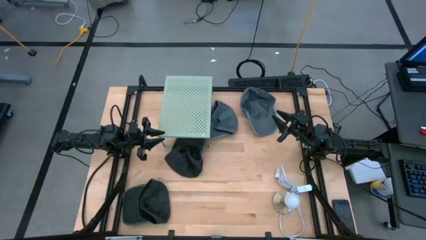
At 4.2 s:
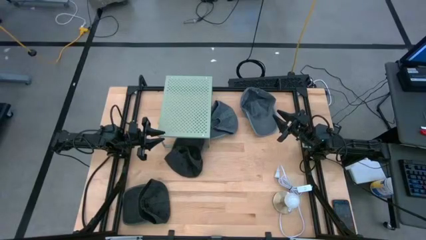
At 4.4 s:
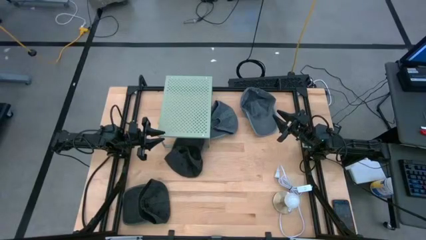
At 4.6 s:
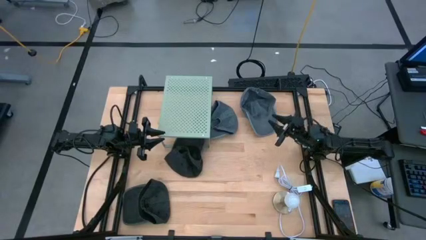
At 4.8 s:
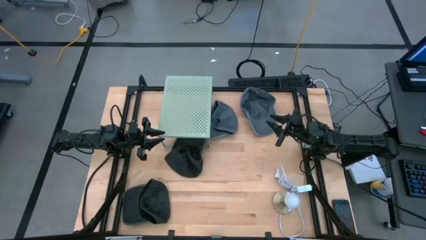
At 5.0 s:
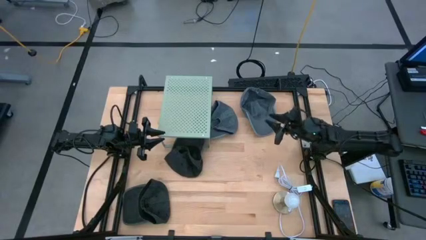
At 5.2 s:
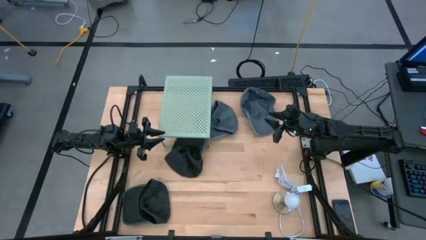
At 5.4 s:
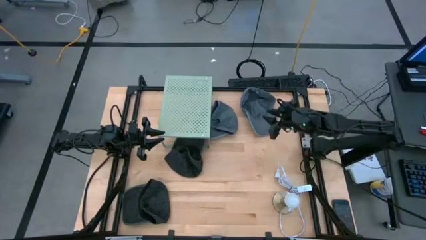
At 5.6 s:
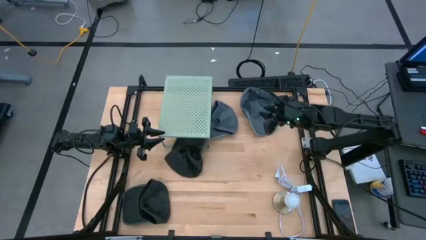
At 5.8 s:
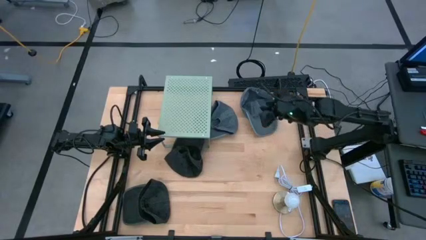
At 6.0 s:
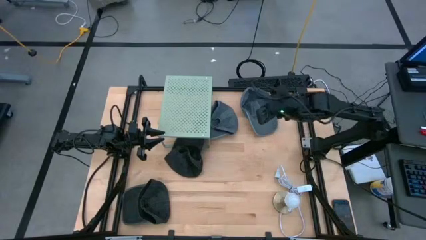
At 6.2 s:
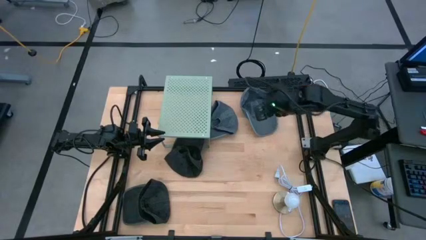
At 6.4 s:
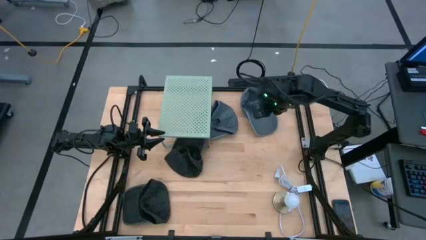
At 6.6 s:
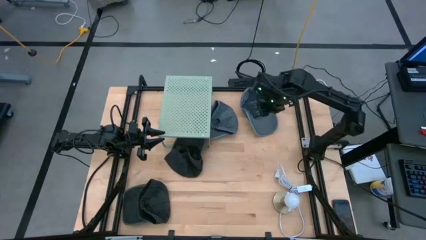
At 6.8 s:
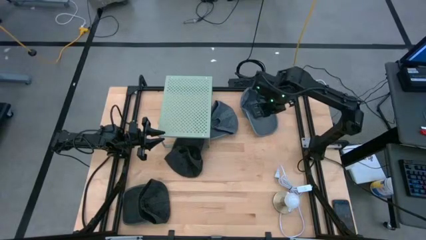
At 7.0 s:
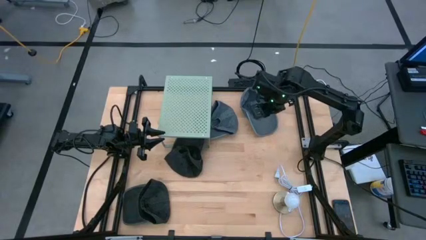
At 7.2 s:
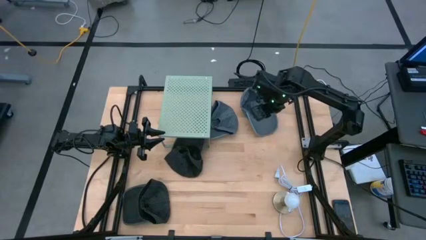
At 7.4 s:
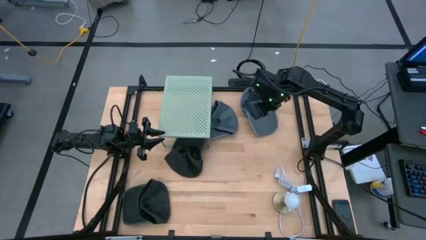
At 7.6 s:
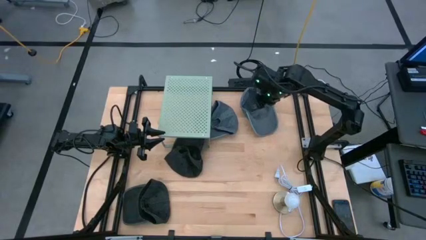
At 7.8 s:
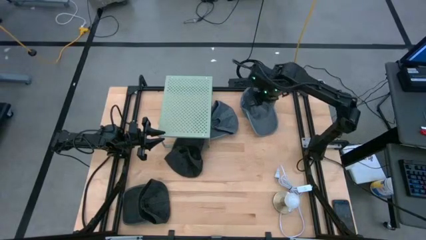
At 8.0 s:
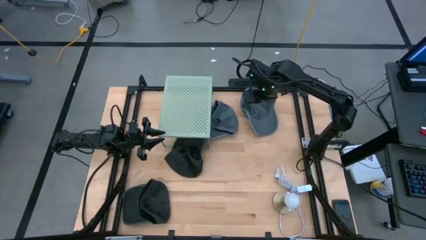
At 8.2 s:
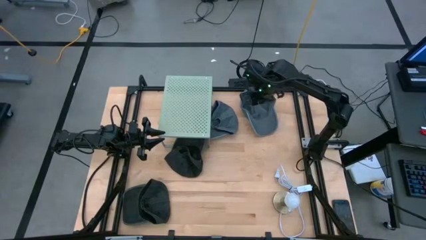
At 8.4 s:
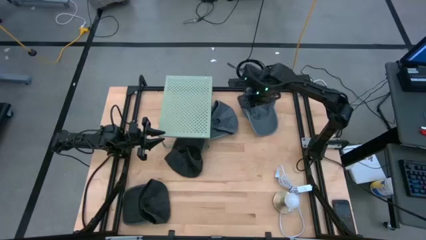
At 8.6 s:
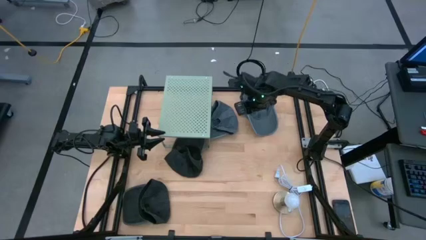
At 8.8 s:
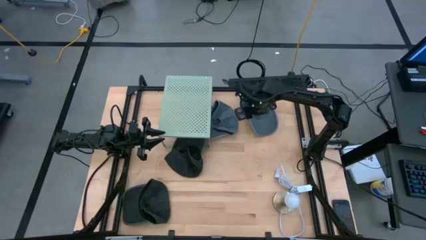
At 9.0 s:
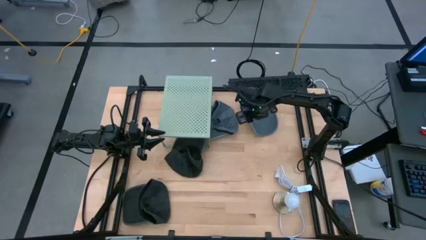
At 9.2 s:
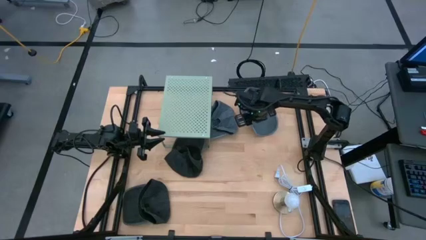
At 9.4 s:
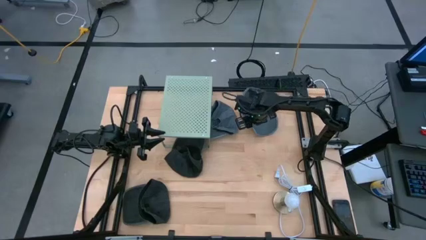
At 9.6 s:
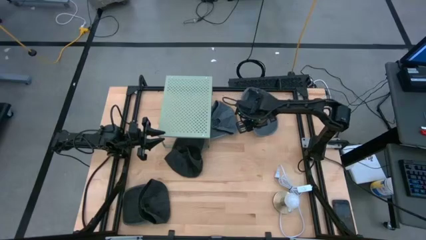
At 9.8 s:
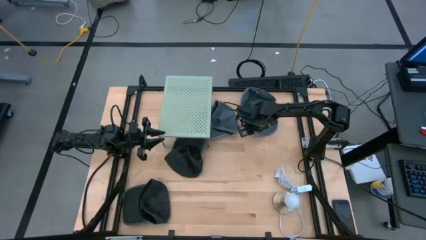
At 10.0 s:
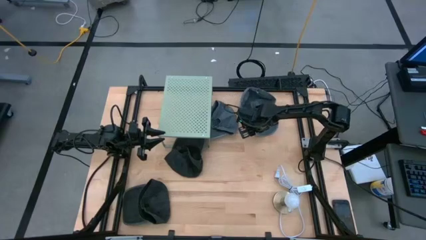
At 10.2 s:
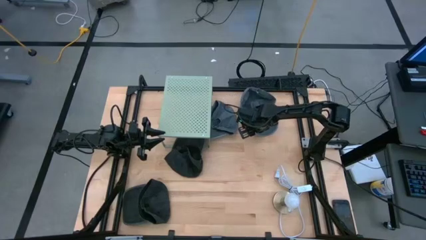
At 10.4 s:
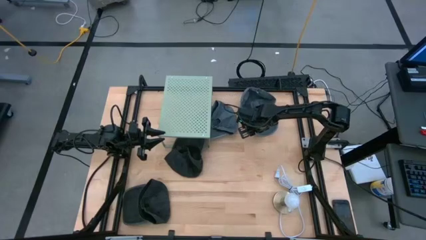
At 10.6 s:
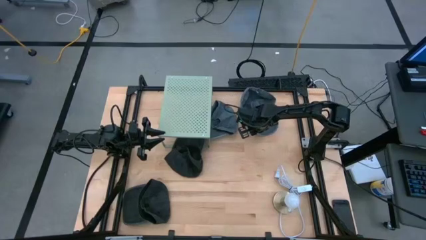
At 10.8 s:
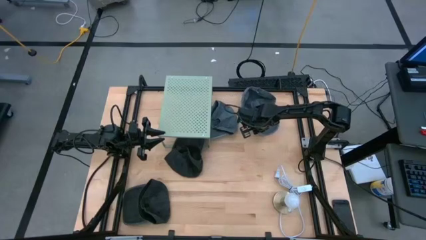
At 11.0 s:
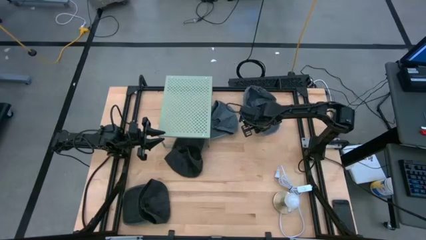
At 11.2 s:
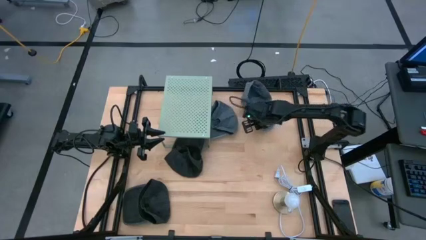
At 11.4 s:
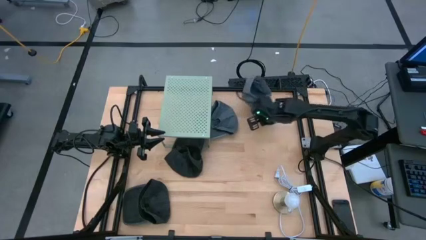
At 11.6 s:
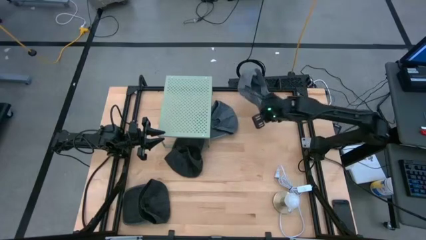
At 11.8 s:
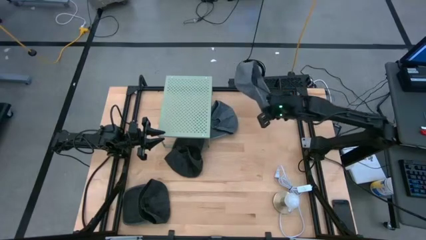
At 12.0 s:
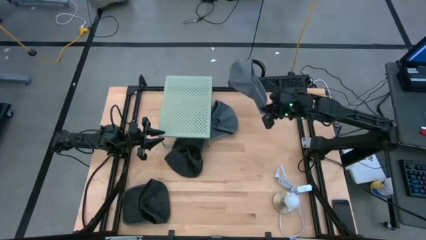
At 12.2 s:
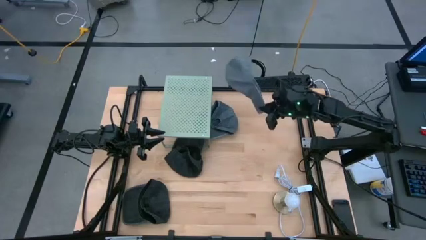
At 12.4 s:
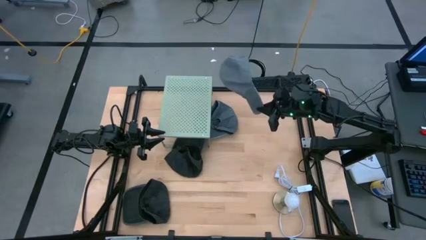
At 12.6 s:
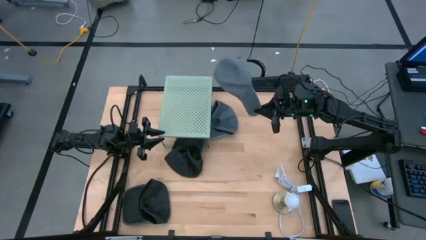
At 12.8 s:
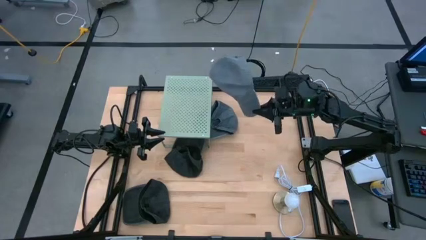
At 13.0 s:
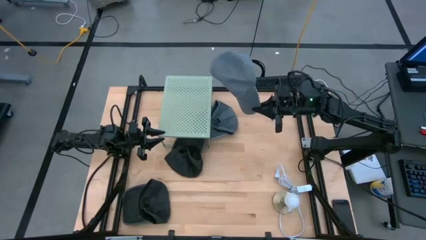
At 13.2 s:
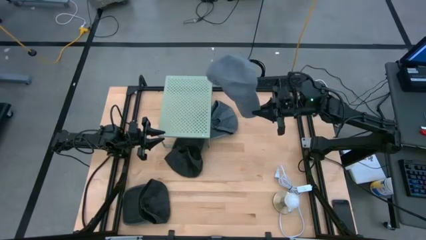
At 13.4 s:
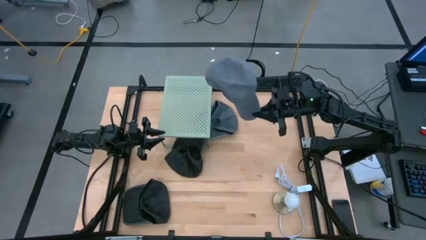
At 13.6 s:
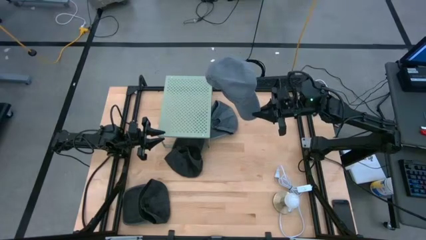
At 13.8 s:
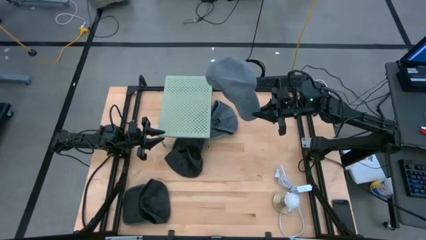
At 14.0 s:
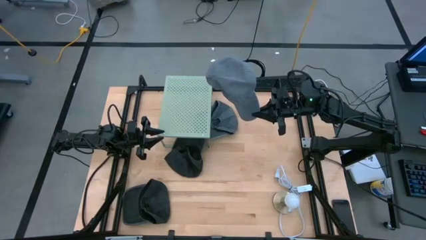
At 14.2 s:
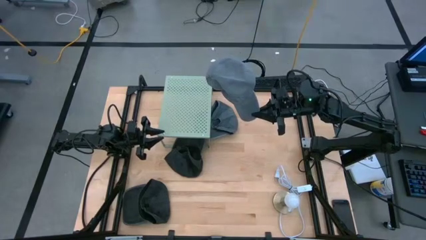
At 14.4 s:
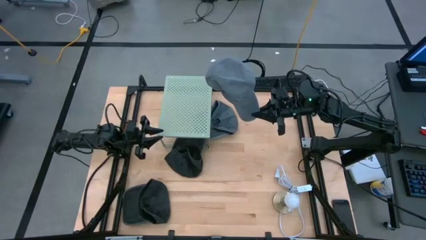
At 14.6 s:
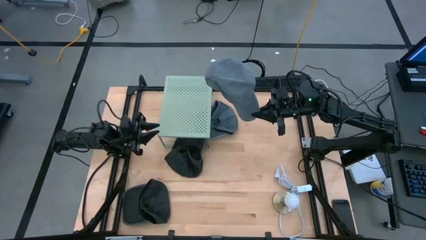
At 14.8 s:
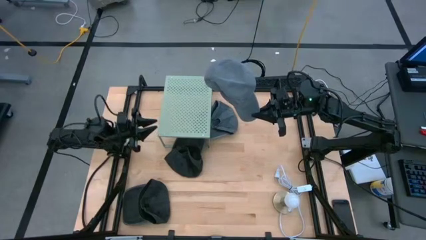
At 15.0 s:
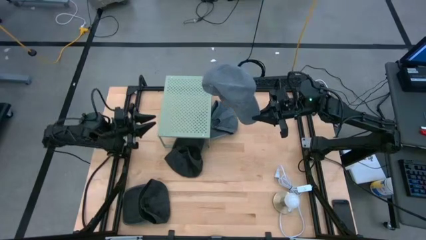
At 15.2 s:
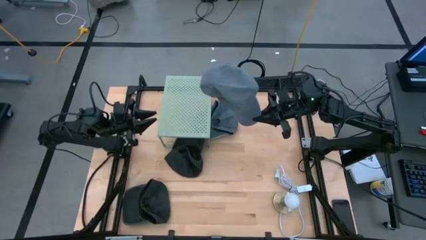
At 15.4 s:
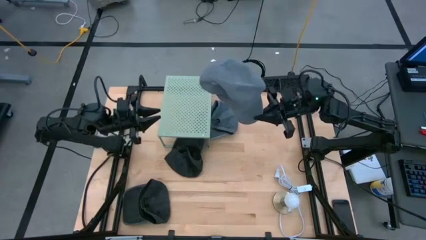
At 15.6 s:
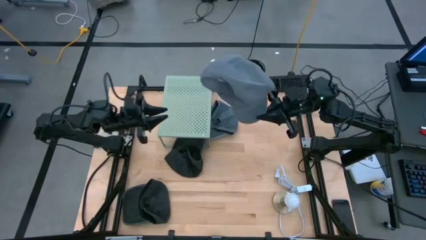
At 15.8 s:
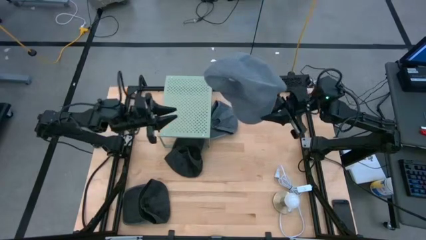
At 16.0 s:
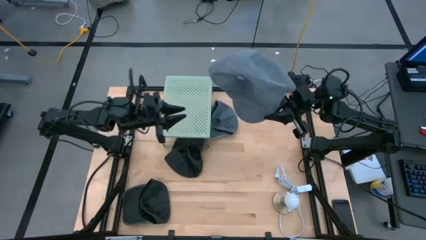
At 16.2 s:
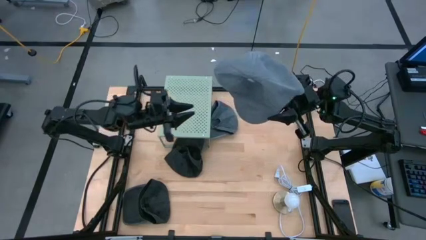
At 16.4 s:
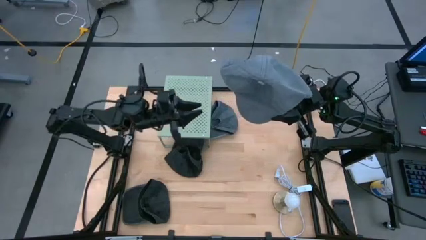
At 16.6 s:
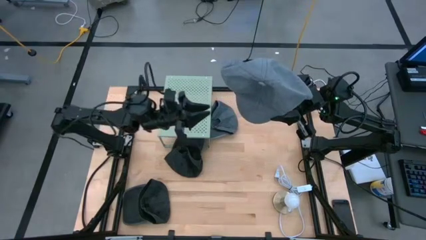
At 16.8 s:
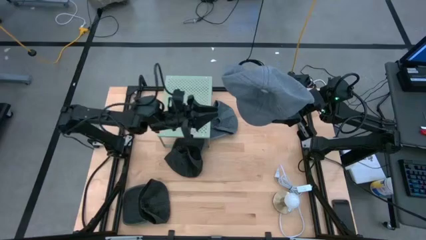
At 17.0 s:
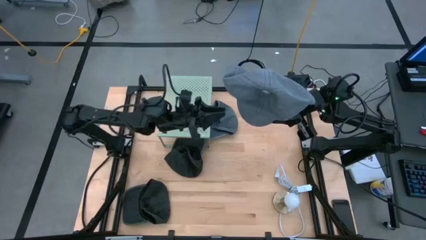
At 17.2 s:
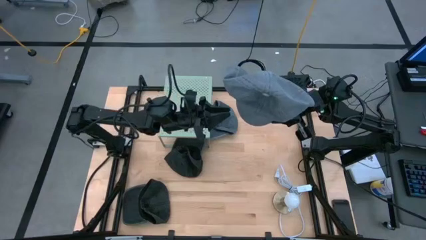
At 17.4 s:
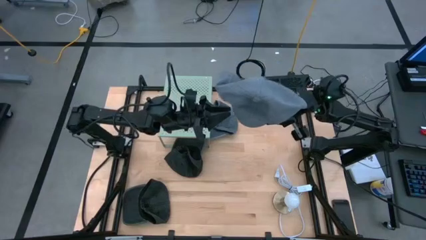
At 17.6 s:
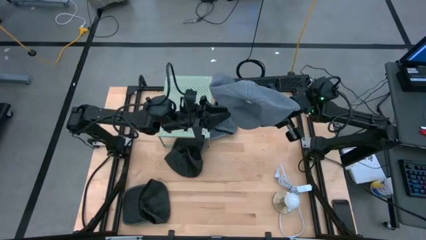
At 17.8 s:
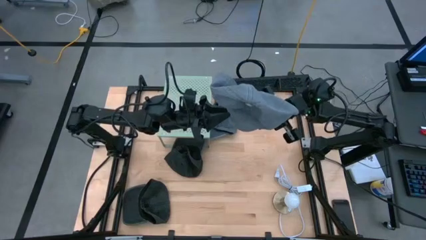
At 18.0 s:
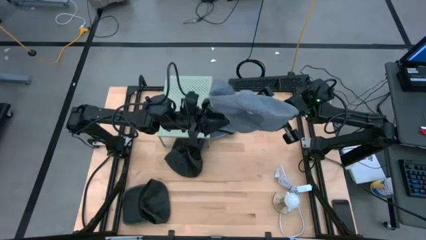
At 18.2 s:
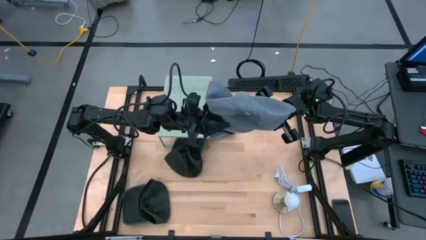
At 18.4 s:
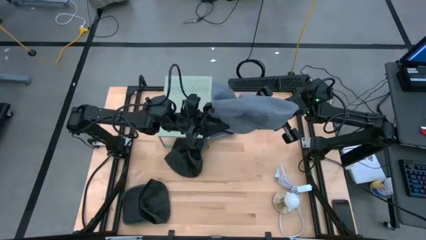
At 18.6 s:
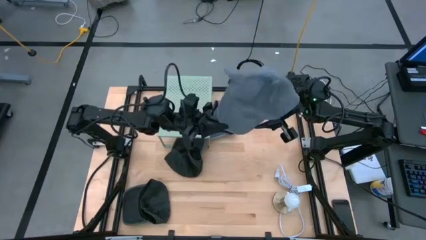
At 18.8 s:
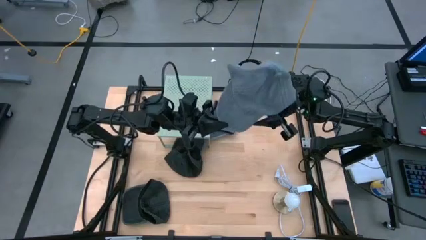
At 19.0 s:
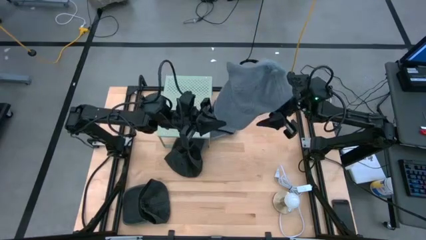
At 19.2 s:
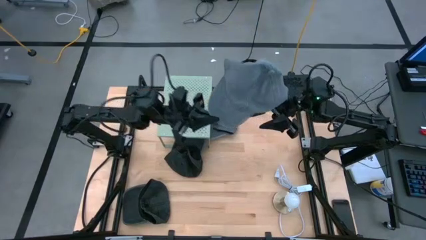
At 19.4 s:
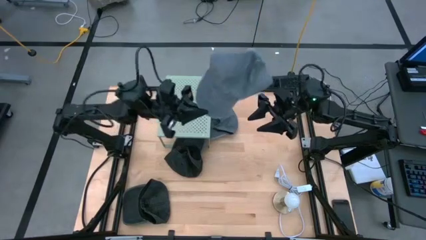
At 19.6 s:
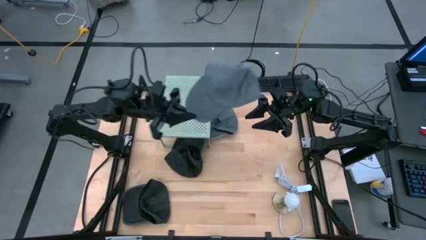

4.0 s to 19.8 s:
Task: Pick & Place hat
Put the right gray cap on the shelf
